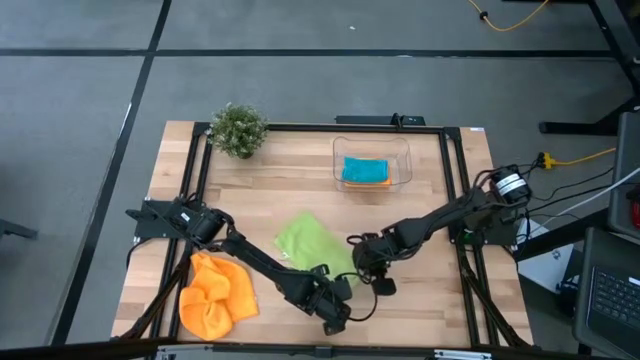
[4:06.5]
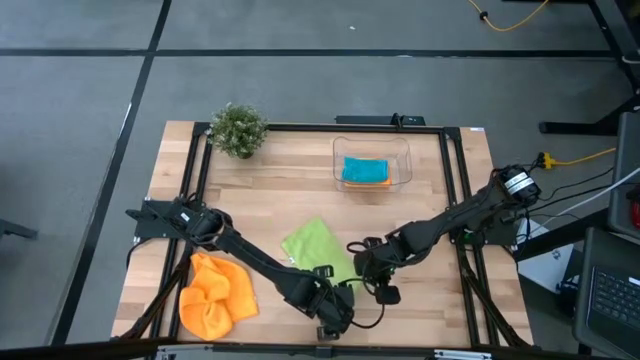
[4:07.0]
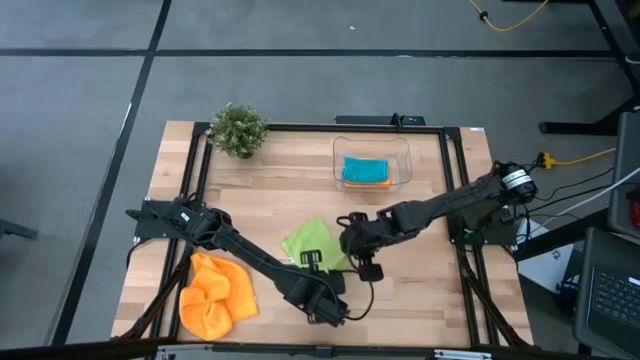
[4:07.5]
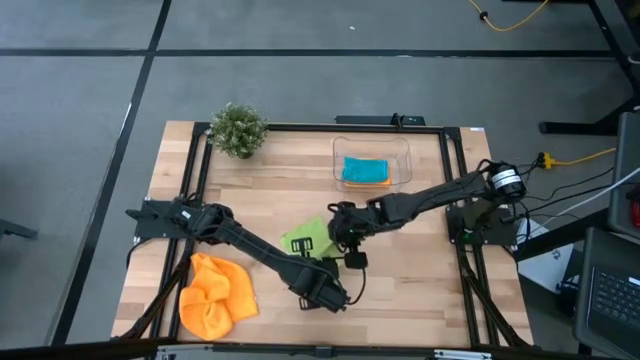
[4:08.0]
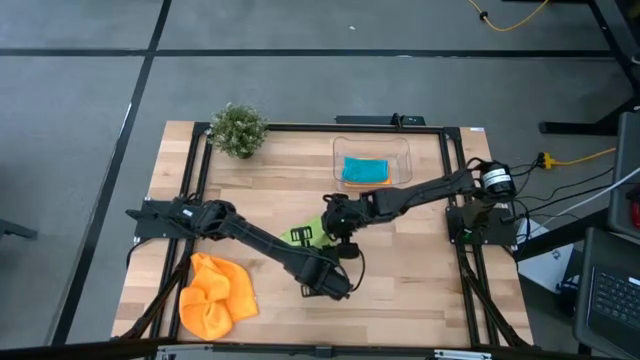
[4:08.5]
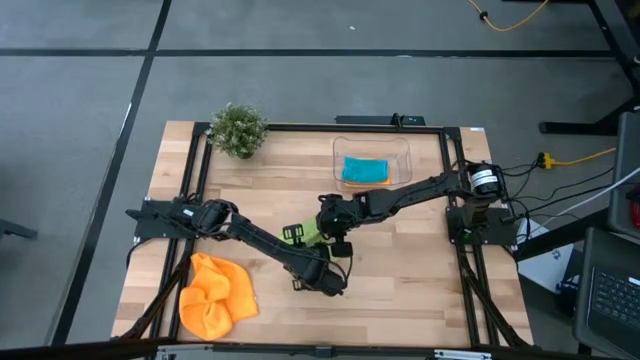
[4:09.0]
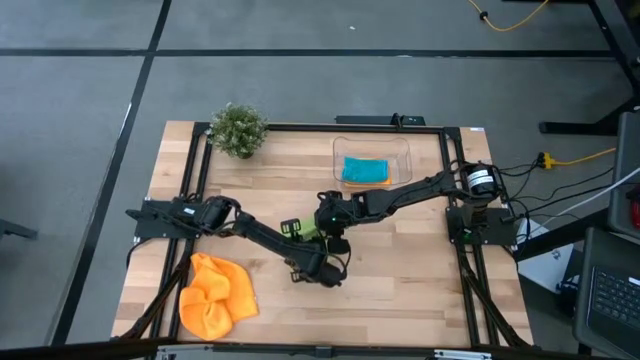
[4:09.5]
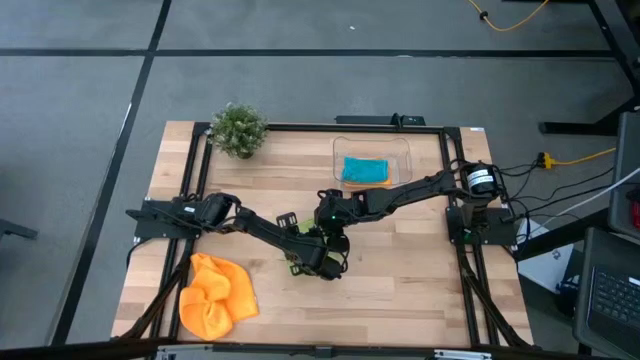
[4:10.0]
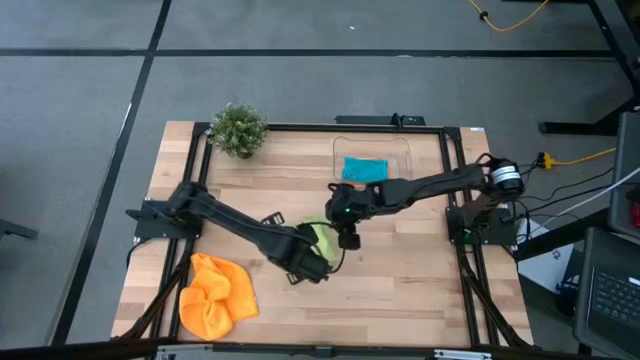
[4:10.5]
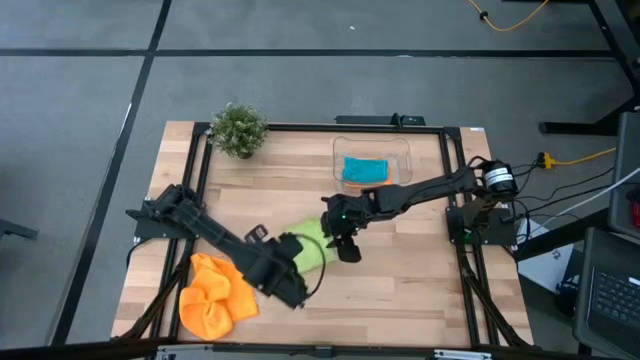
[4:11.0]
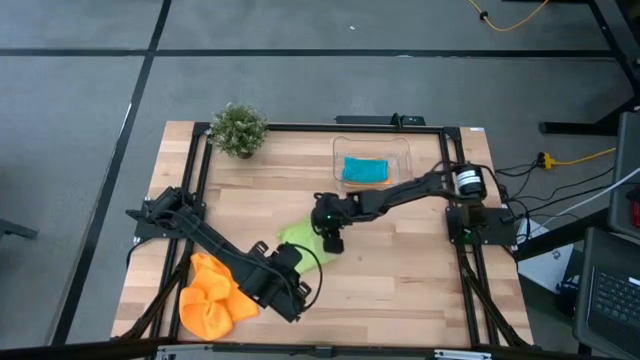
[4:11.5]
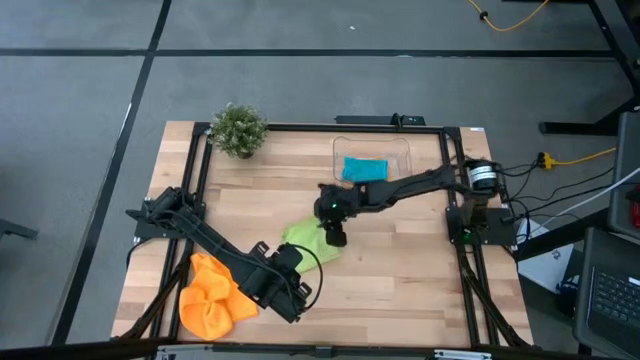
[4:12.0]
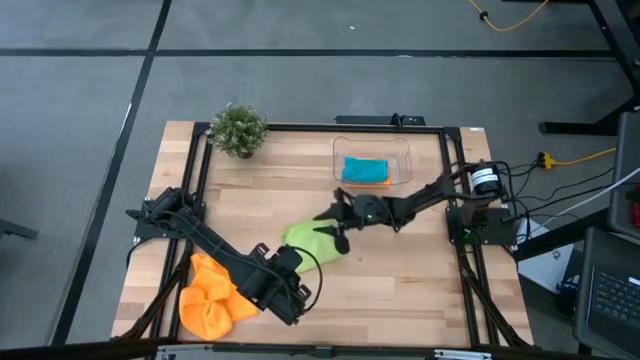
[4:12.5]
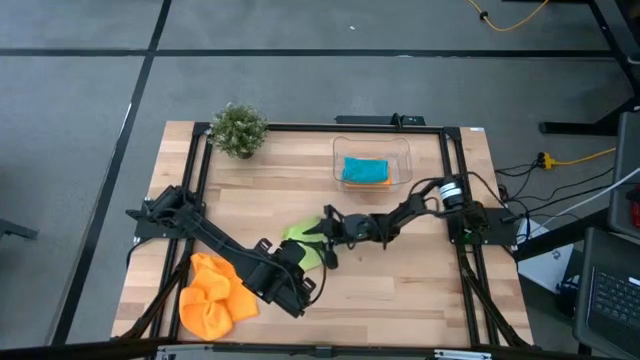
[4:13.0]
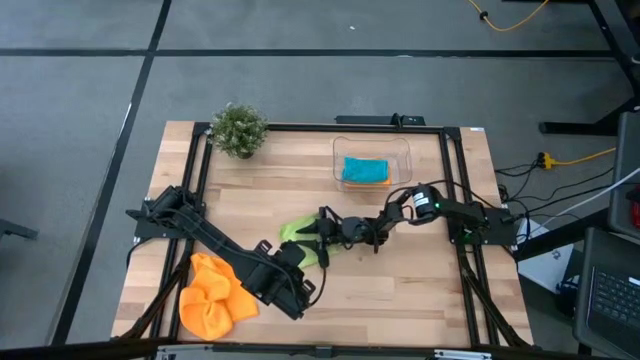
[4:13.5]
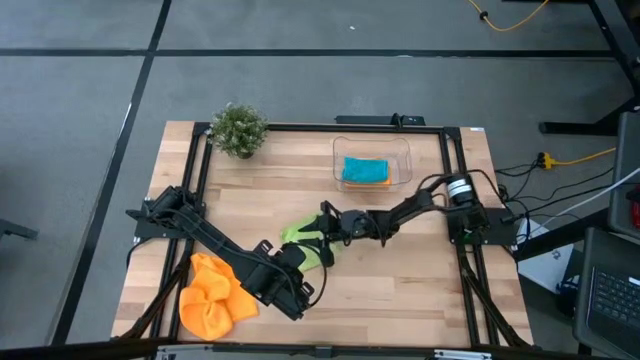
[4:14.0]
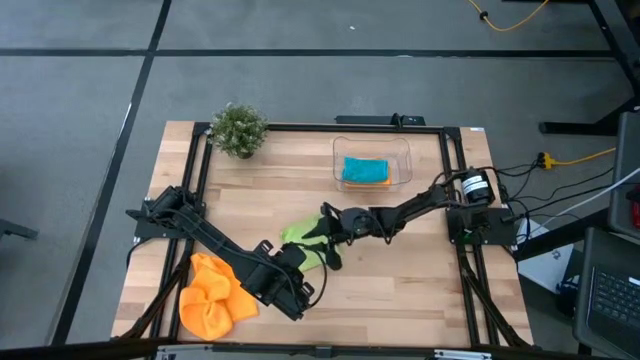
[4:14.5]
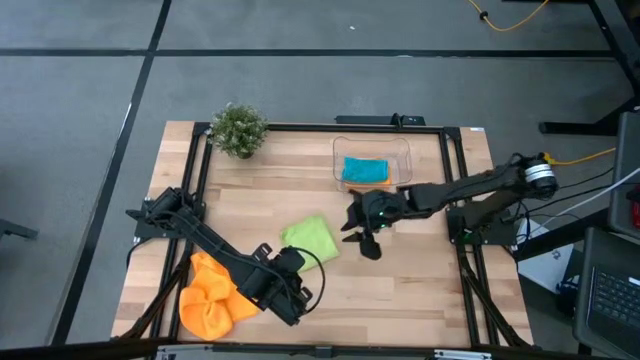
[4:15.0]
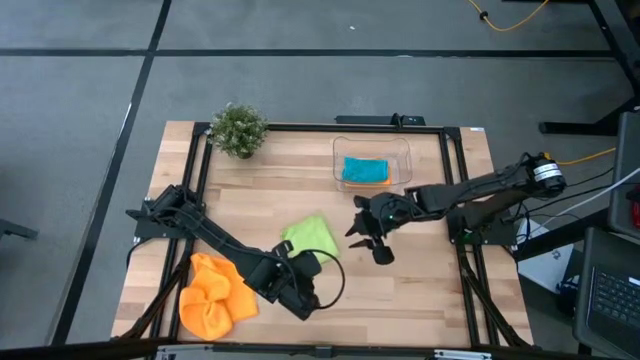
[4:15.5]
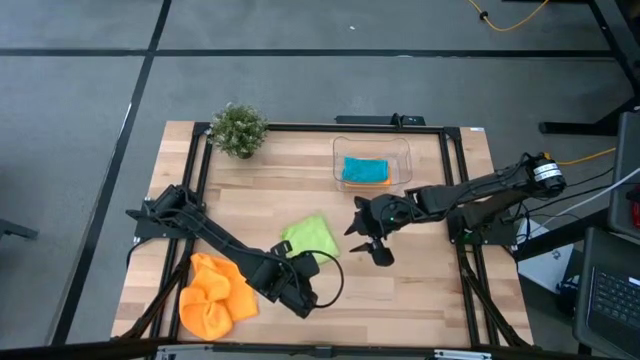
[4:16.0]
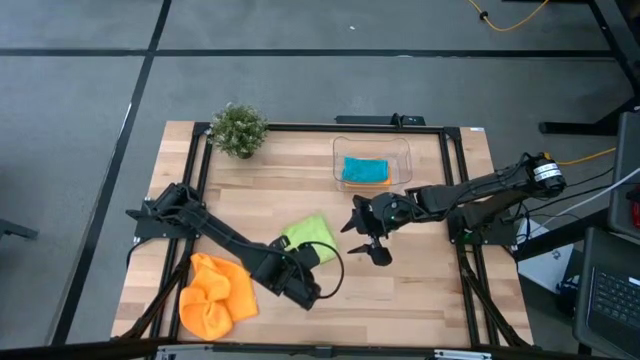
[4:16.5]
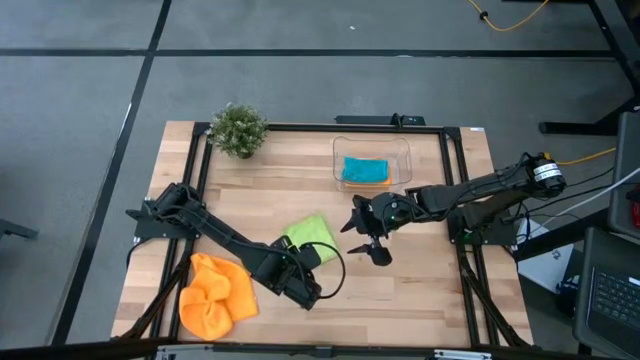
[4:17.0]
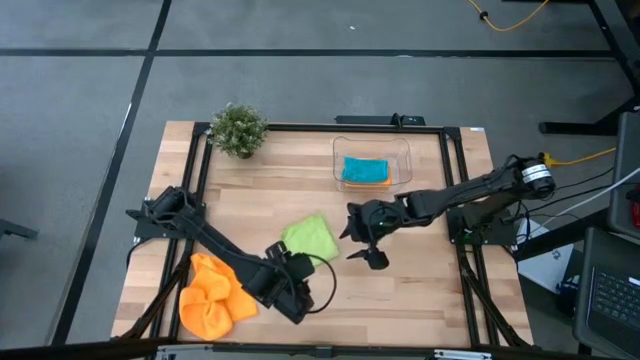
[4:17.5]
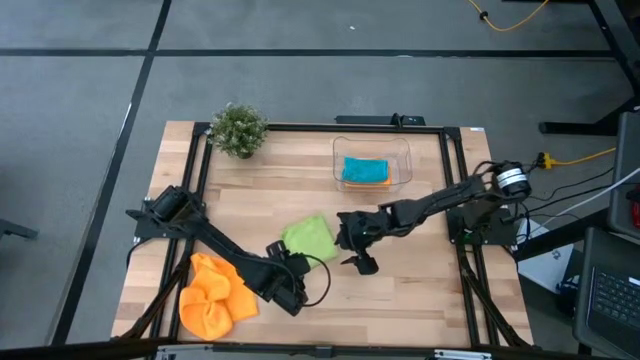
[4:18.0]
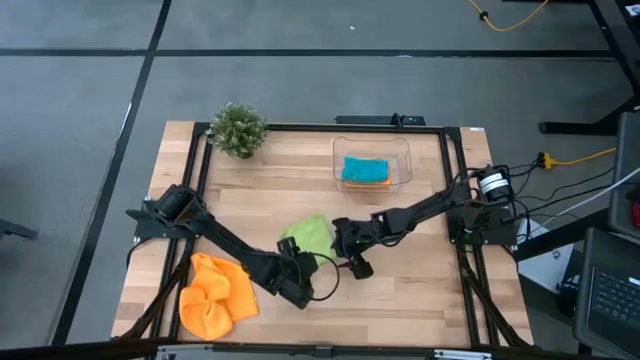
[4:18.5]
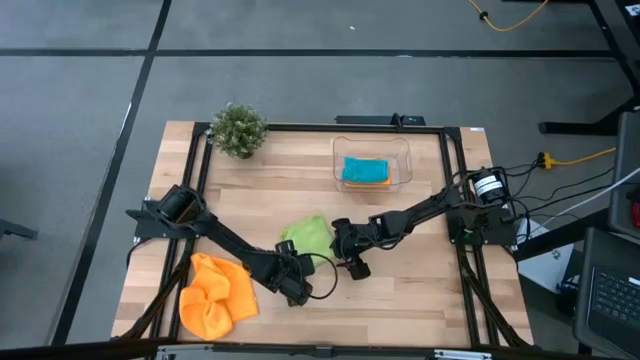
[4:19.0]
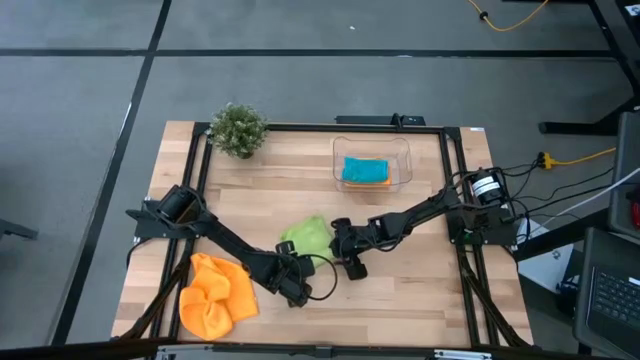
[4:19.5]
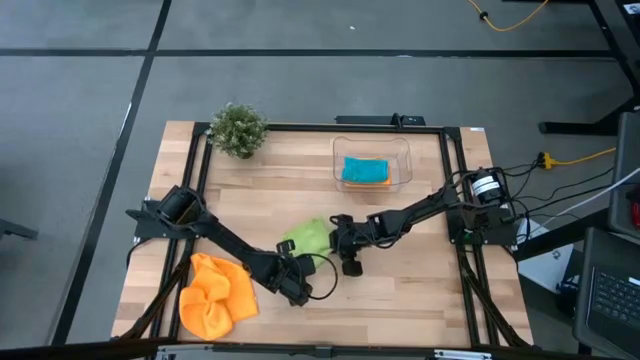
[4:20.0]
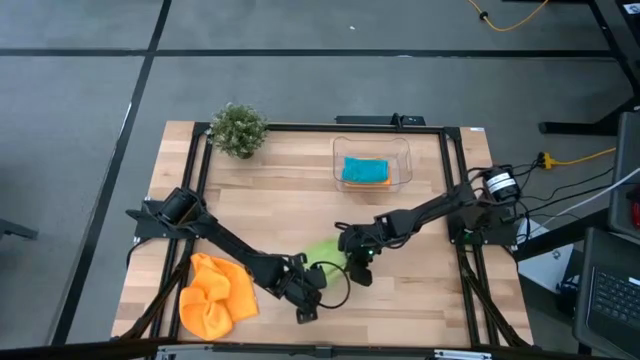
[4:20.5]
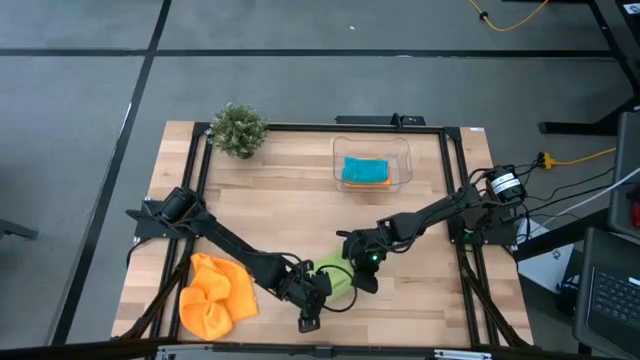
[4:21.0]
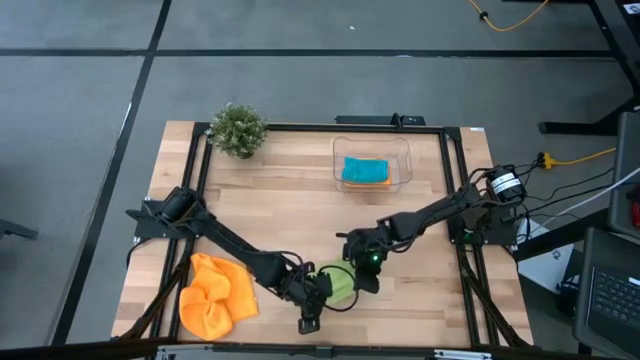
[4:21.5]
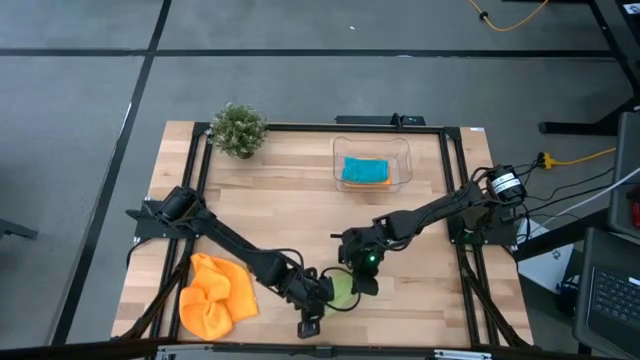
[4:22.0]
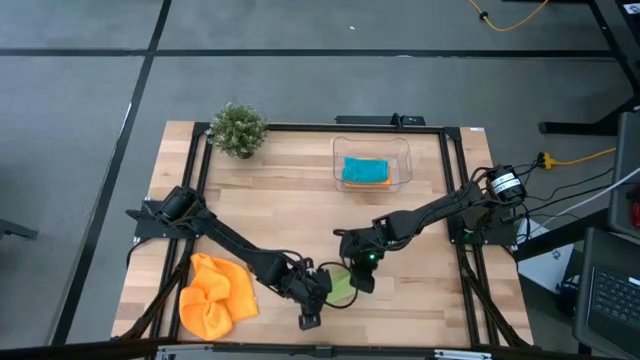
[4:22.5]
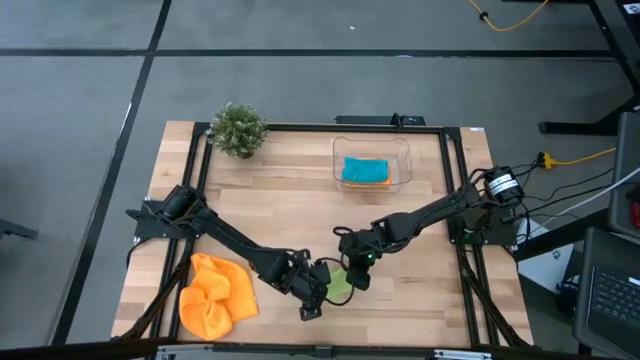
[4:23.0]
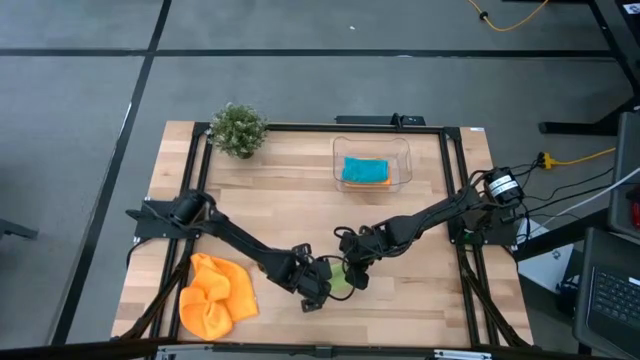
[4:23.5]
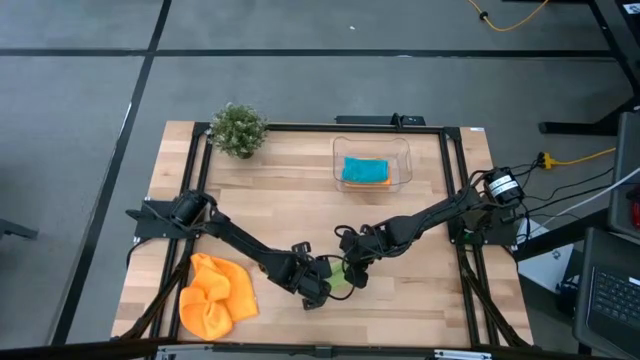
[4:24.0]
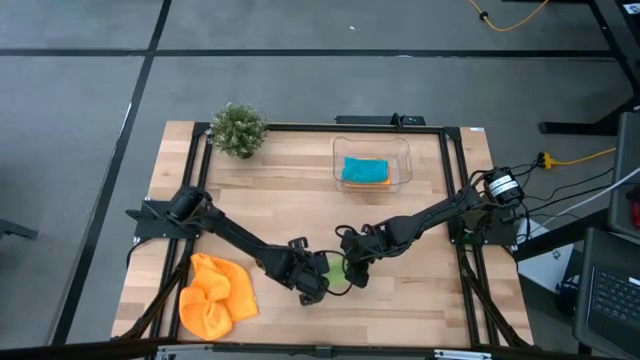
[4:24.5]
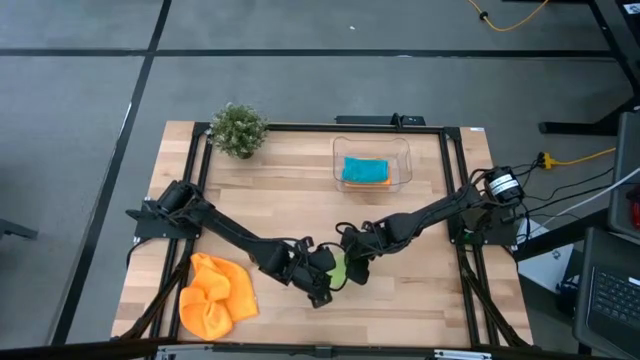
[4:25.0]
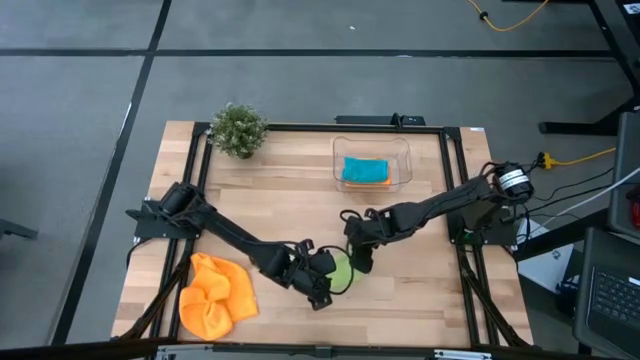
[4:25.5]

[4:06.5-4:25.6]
Task: Fold microfiber towels
Fold the green microfiber cloth
